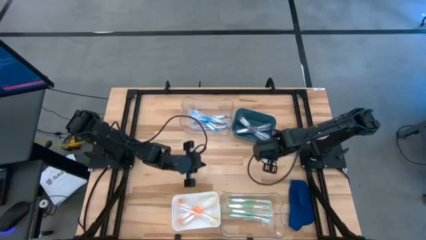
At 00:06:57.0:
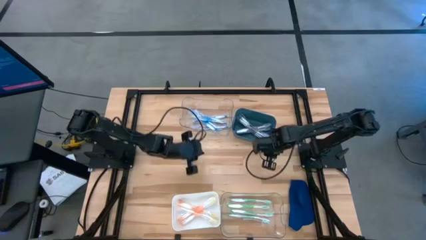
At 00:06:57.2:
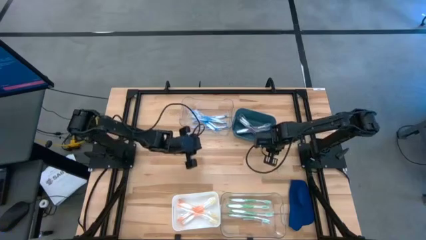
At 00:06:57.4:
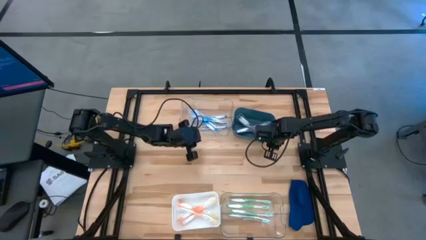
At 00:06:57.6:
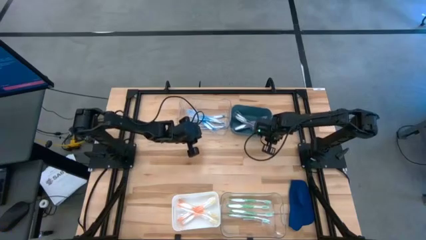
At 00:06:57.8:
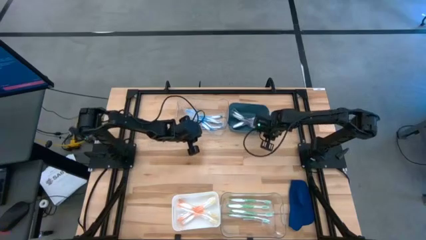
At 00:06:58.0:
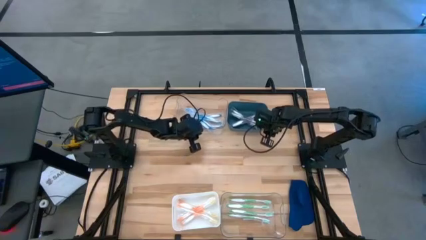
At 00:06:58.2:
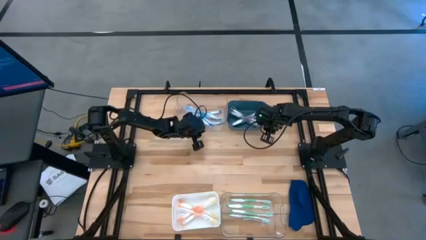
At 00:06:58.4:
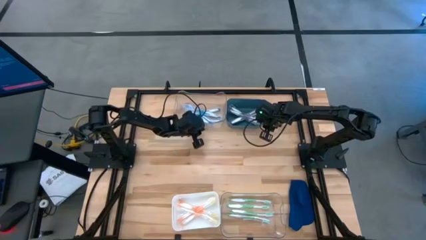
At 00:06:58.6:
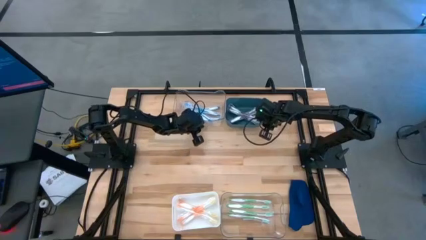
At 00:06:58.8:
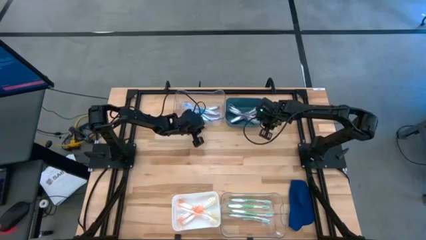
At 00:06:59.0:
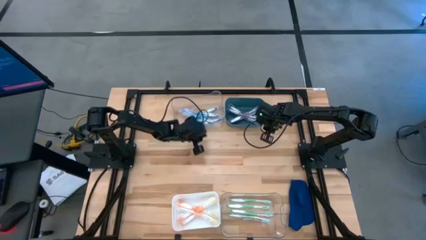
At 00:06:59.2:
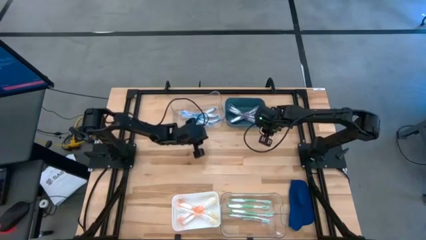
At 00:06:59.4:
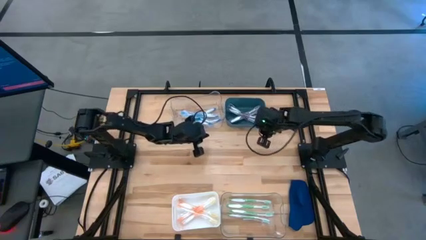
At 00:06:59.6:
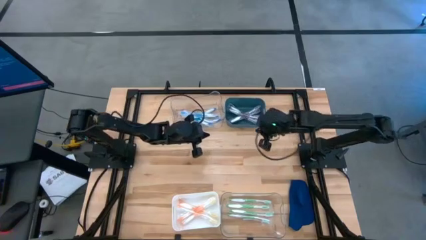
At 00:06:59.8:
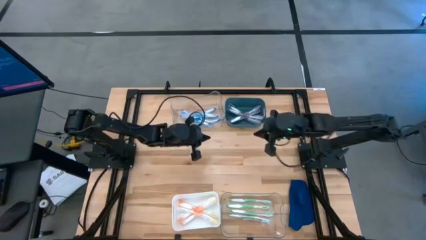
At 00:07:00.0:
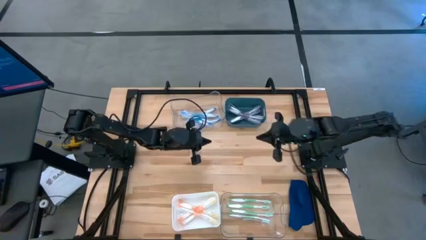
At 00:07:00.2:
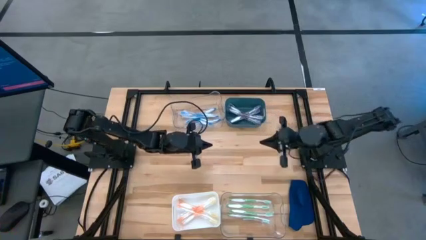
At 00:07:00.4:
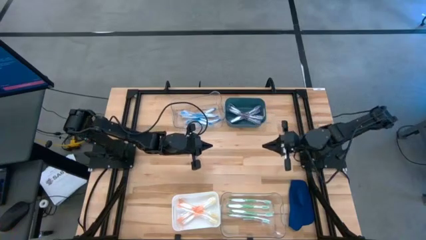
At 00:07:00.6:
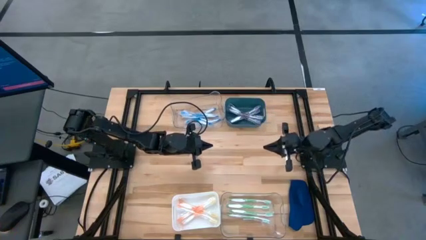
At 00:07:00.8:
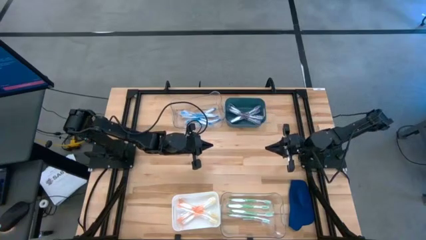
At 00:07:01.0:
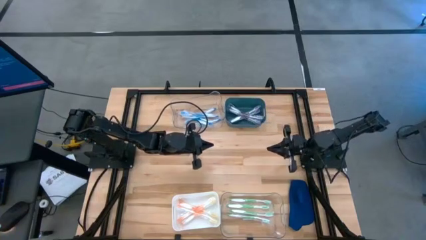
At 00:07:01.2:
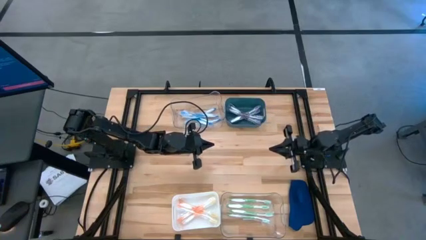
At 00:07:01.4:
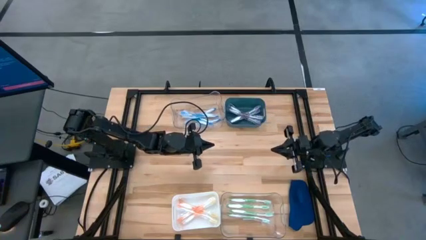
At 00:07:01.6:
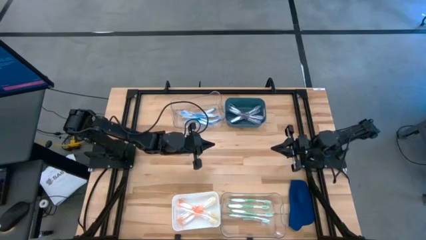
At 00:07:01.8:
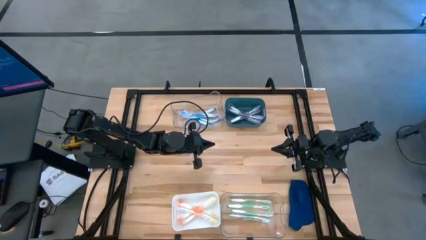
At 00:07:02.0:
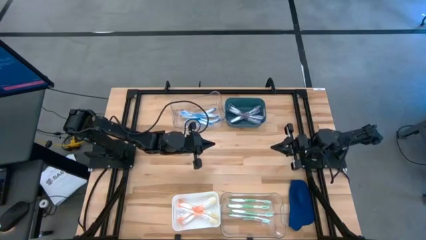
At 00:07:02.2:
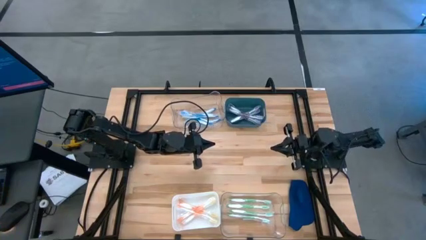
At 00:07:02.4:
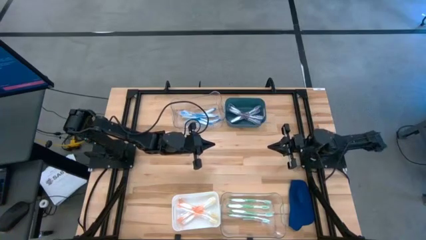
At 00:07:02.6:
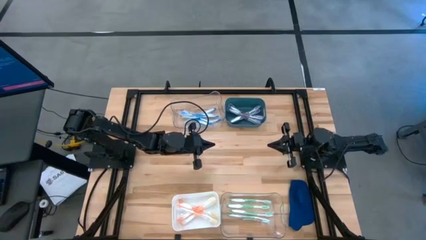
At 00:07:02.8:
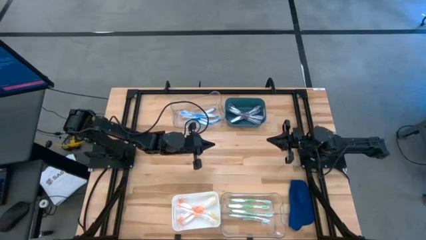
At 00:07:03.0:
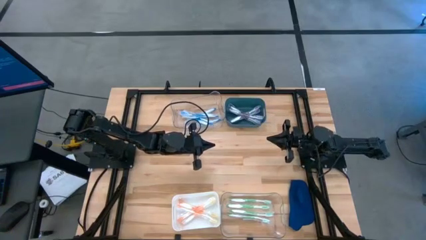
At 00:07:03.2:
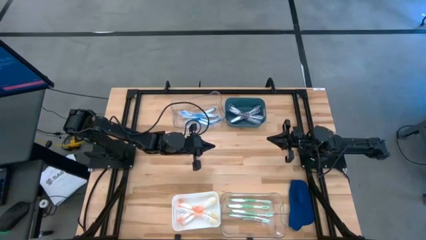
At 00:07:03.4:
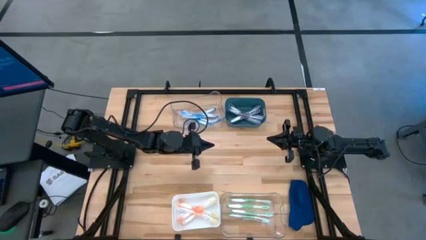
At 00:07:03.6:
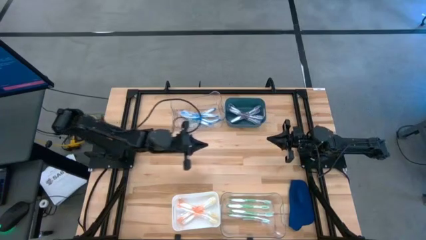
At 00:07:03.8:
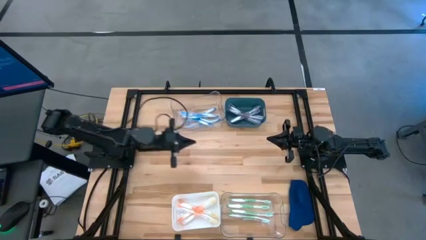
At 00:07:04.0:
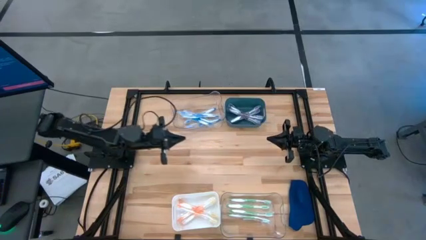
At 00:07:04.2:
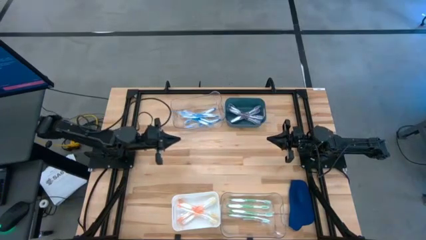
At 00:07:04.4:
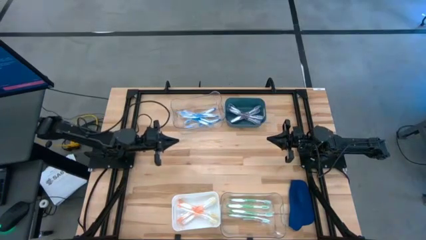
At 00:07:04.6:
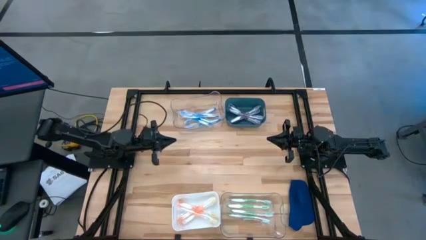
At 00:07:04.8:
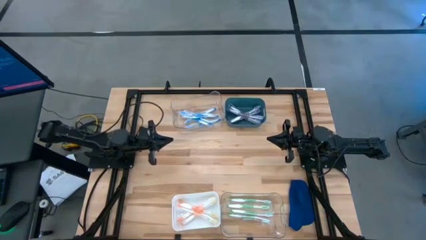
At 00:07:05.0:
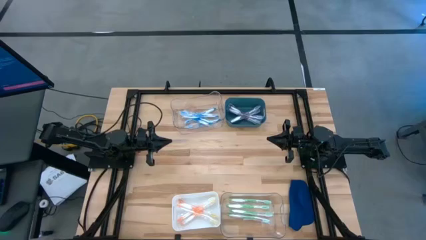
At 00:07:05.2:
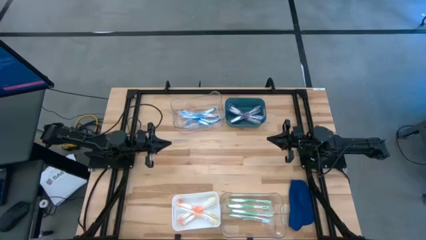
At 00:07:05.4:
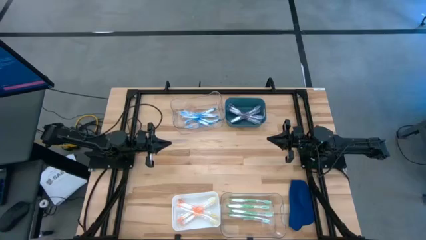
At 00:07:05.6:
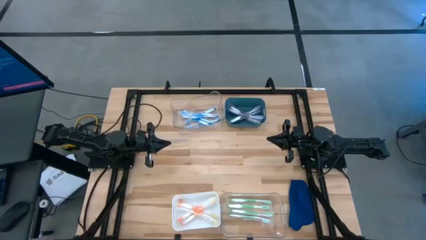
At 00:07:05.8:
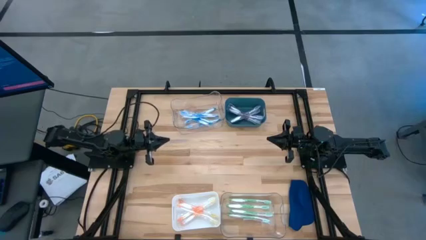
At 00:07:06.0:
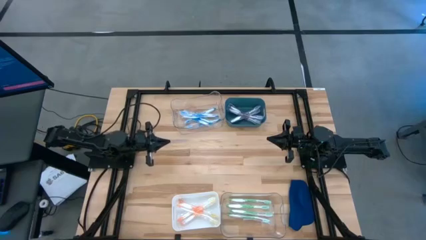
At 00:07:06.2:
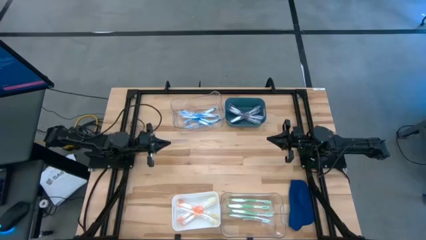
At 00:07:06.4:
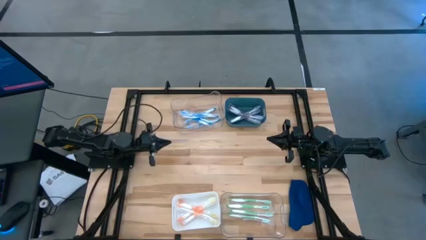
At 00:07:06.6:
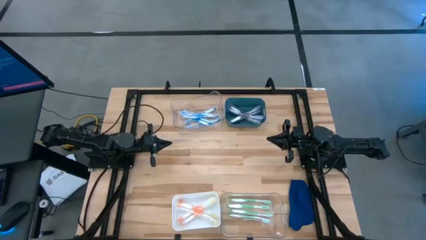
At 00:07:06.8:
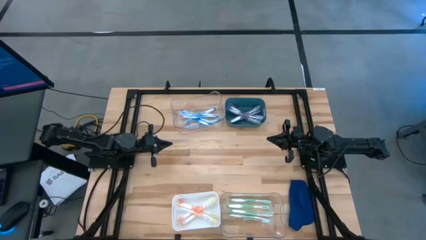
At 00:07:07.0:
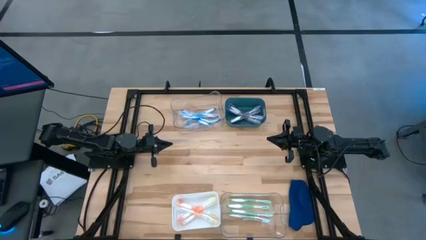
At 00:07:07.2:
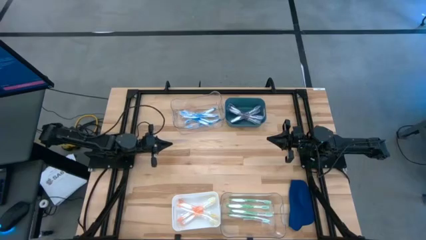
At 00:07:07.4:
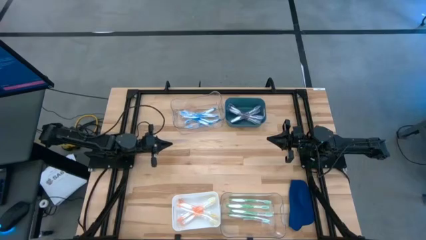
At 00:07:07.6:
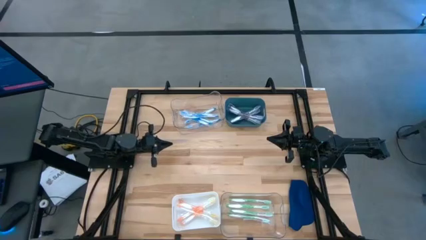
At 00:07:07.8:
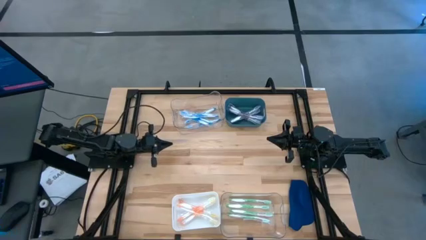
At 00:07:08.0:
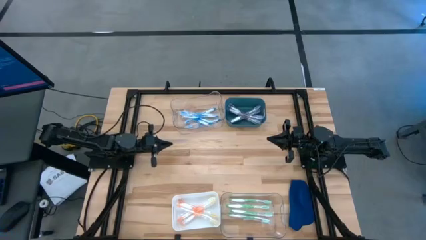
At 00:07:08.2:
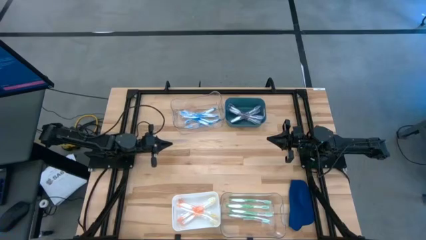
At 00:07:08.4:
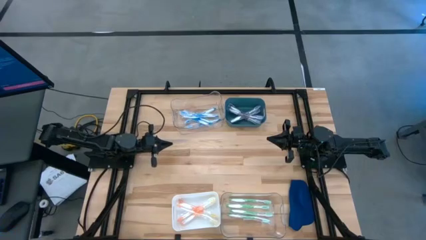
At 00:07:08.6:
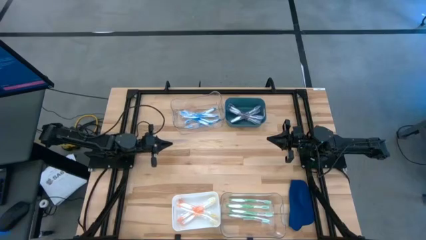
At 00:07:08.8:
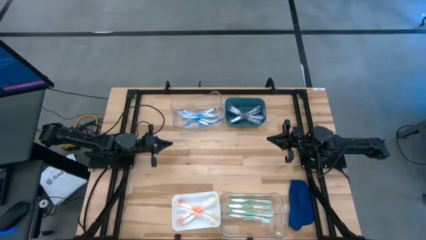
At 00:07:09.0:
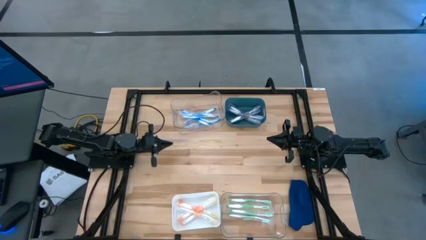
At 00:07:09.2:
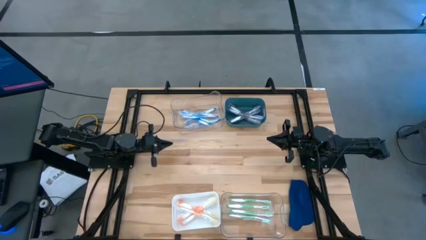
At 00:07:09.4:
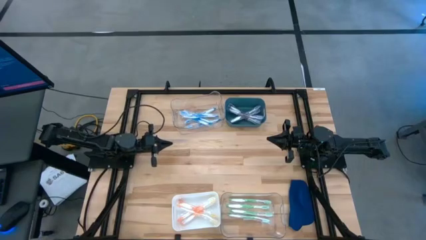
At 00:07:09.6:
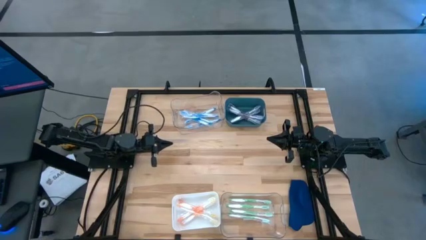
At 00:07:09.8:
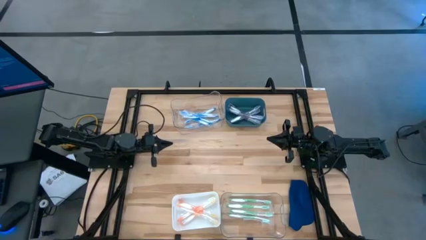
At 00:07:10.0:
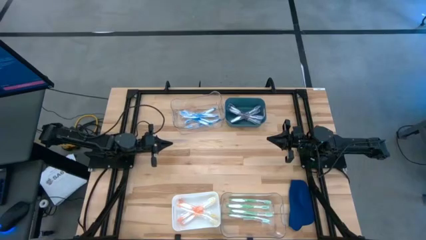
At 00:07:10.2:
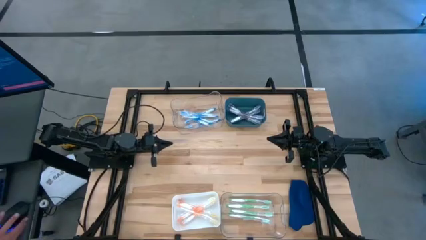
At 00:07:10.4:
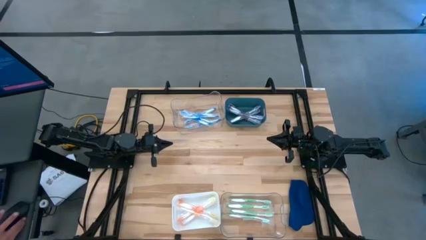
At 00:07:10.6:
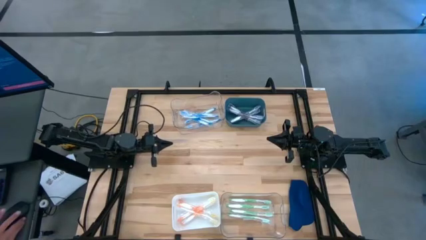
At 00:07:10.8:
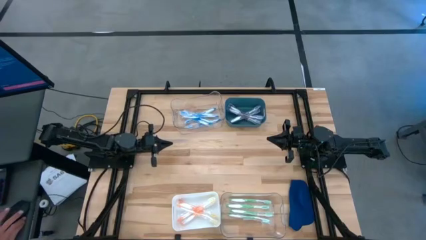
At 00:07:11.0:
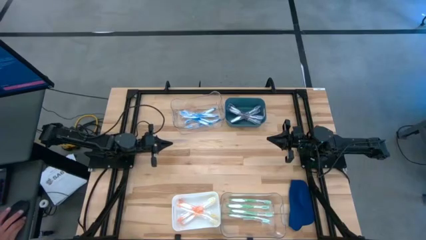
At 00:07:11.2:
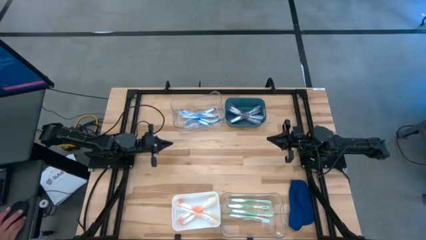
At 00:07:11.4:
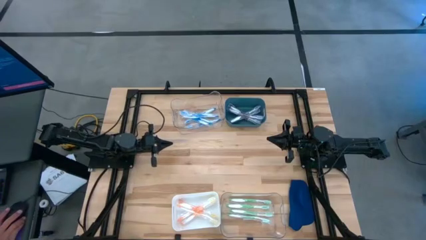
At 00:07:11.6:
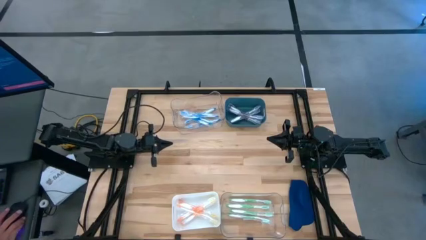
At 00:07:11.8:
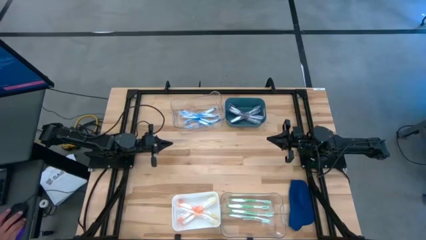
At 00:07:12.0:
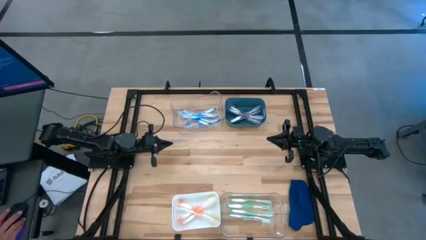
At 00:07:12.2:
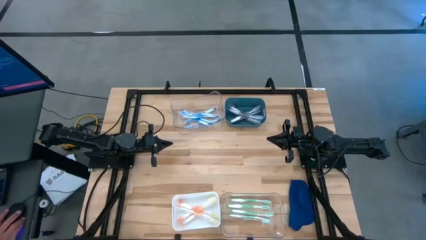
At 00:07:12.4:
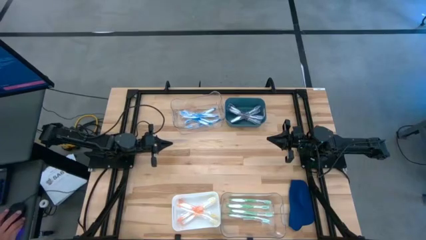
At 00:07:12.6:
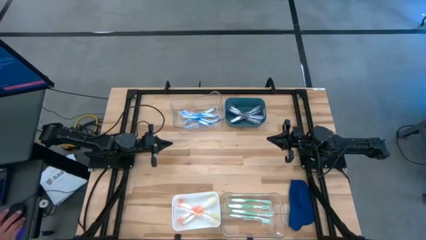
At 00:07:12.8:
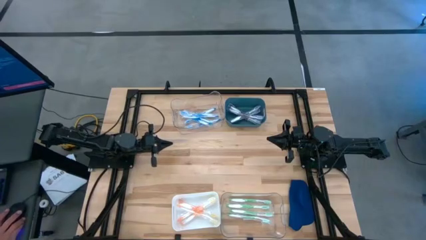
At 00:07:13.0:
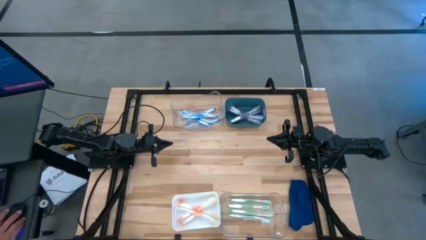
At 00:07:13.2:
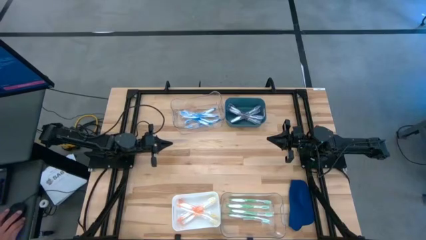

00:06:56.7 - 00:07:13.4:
Task: Pick & Place Toothbrushes
Return to Home Position
